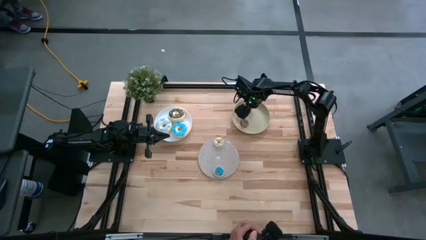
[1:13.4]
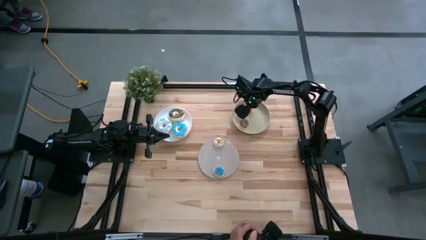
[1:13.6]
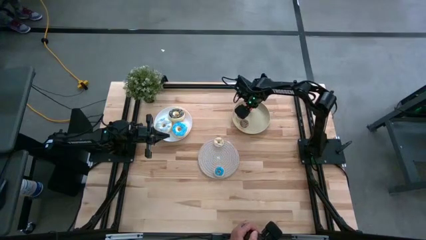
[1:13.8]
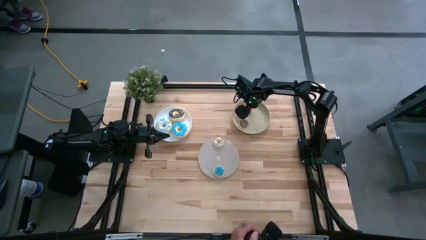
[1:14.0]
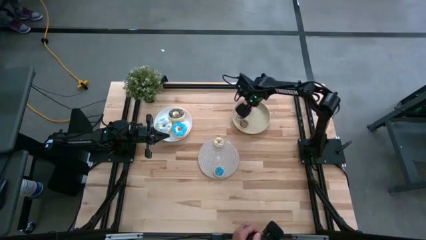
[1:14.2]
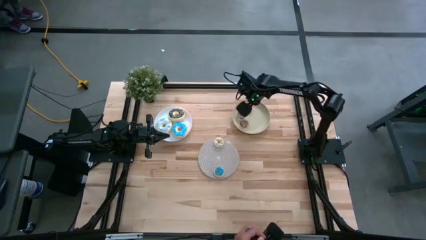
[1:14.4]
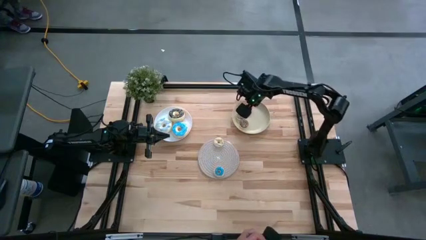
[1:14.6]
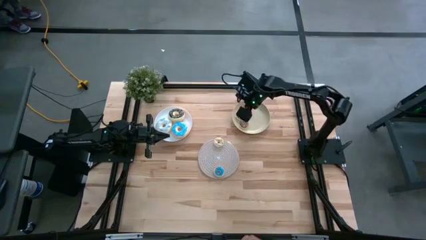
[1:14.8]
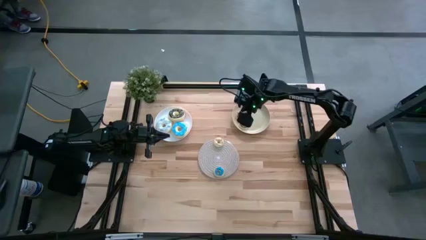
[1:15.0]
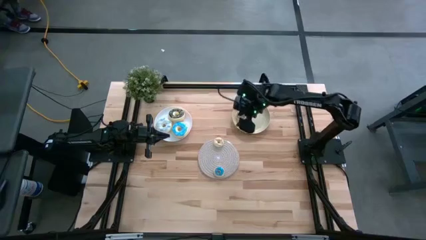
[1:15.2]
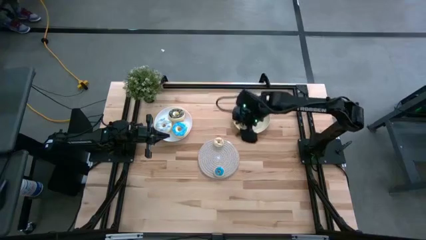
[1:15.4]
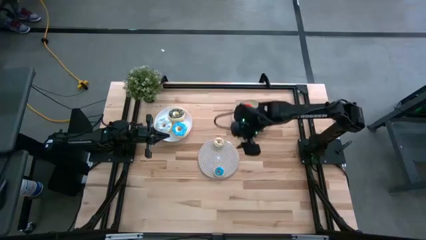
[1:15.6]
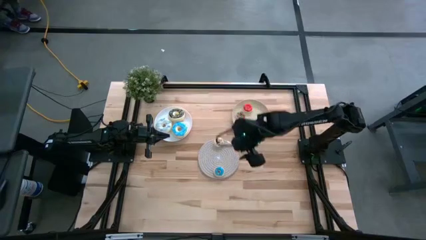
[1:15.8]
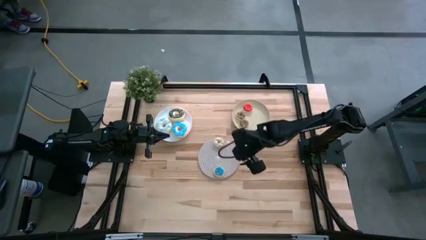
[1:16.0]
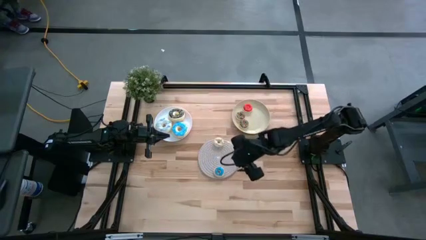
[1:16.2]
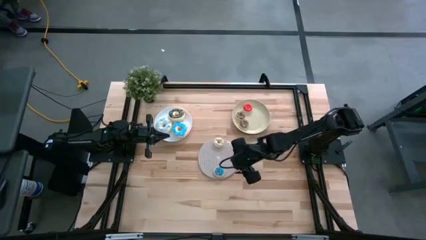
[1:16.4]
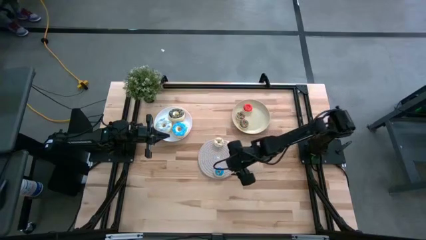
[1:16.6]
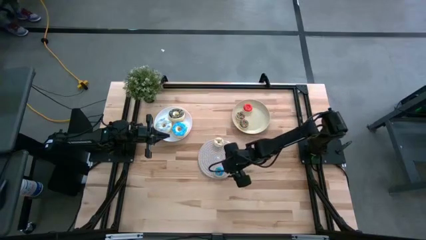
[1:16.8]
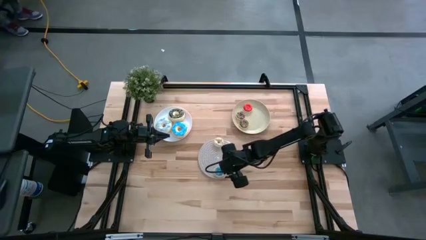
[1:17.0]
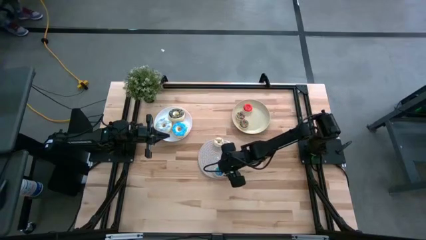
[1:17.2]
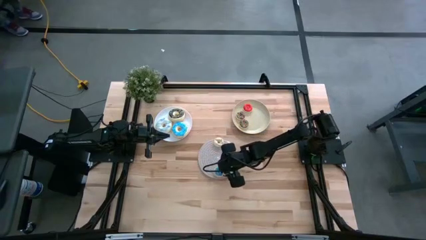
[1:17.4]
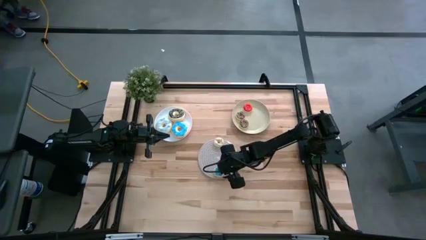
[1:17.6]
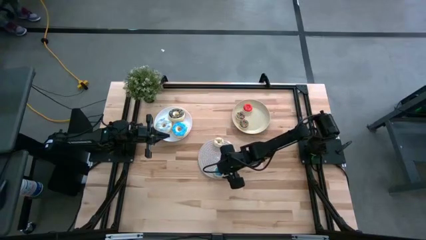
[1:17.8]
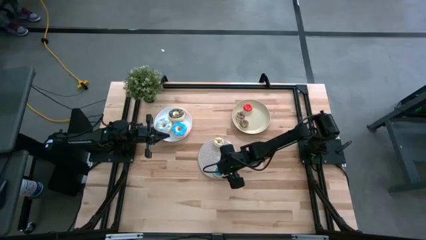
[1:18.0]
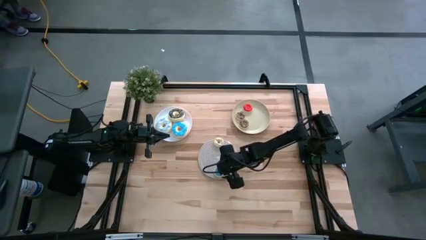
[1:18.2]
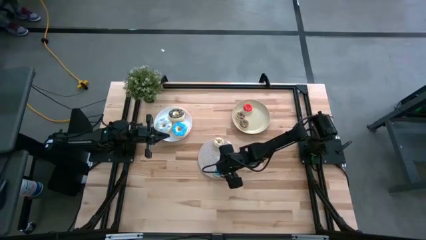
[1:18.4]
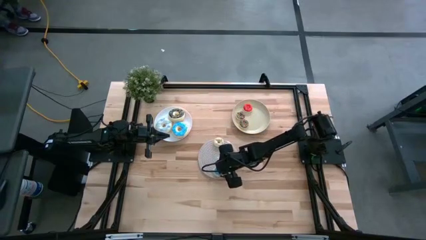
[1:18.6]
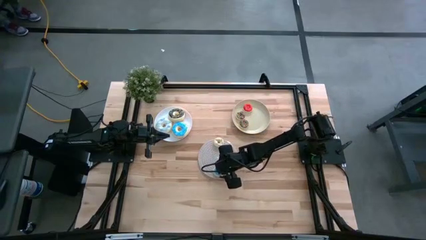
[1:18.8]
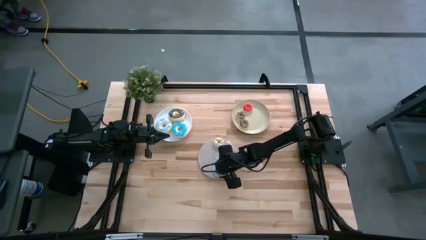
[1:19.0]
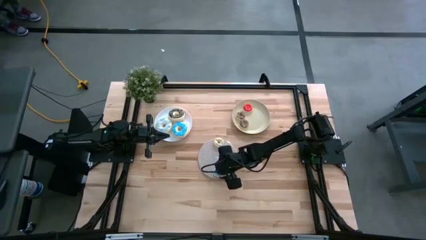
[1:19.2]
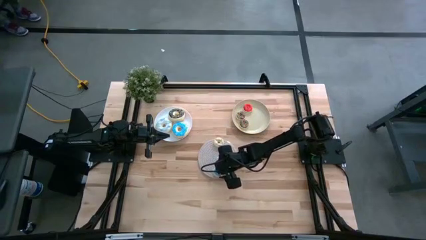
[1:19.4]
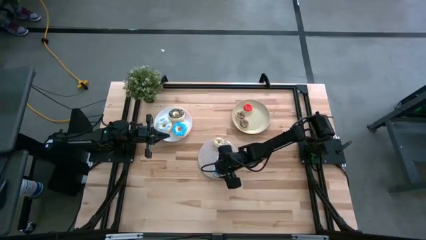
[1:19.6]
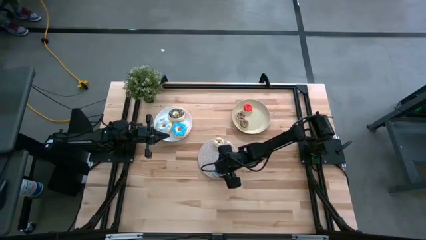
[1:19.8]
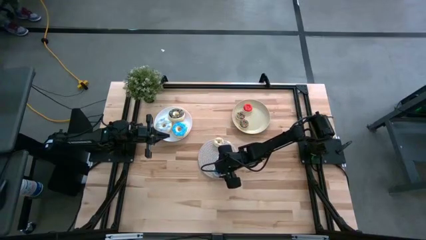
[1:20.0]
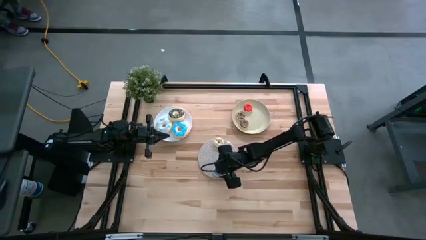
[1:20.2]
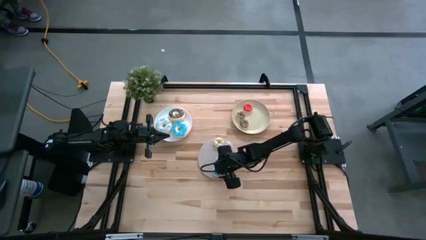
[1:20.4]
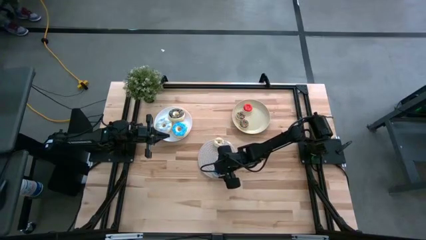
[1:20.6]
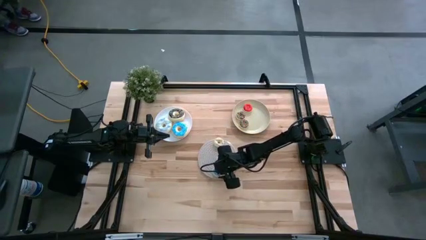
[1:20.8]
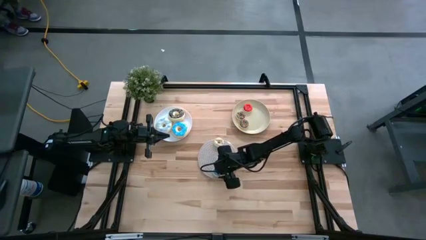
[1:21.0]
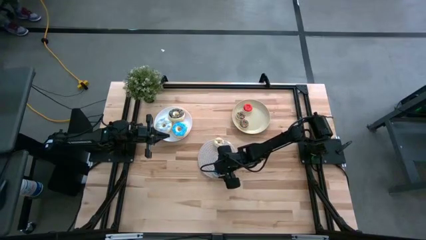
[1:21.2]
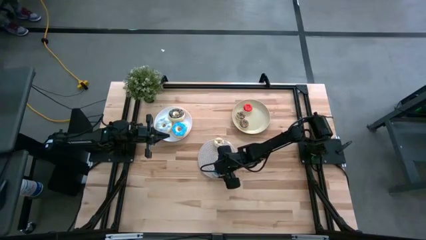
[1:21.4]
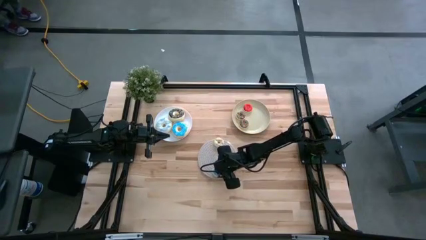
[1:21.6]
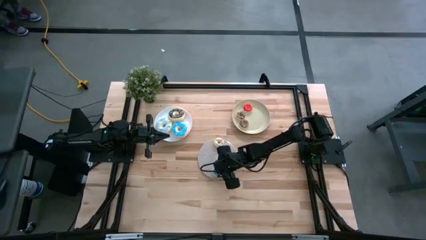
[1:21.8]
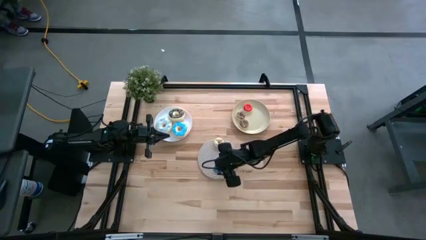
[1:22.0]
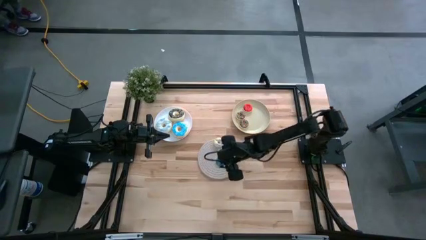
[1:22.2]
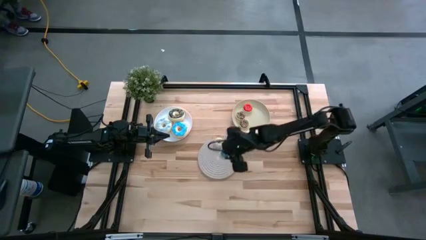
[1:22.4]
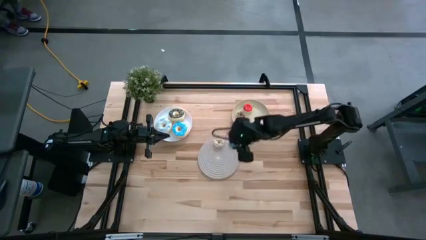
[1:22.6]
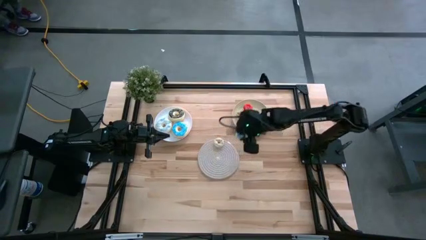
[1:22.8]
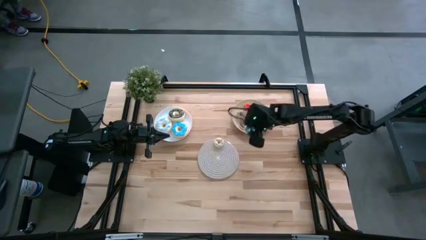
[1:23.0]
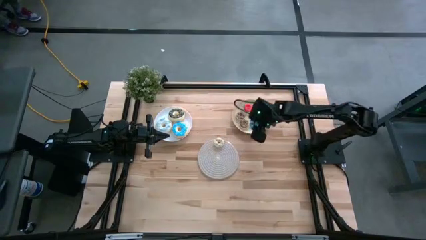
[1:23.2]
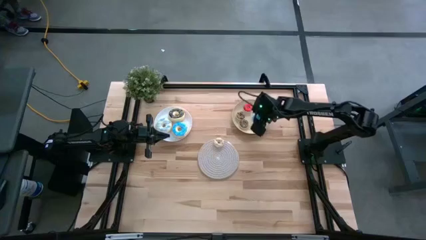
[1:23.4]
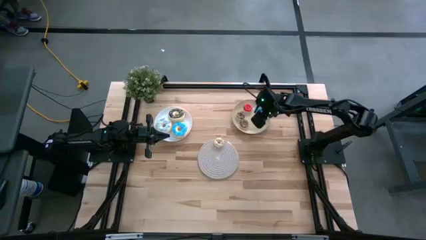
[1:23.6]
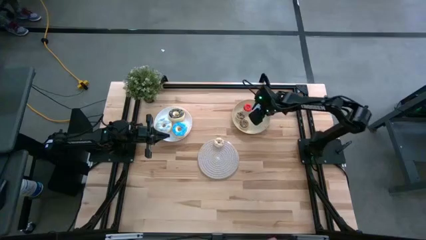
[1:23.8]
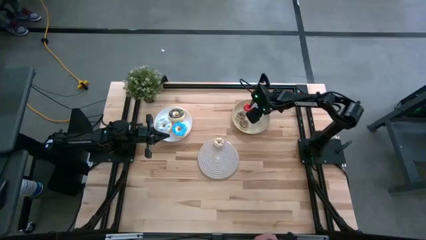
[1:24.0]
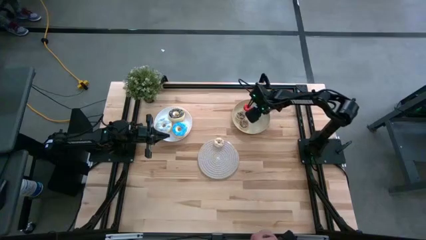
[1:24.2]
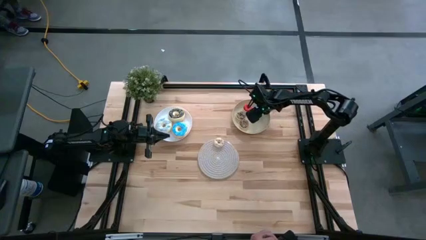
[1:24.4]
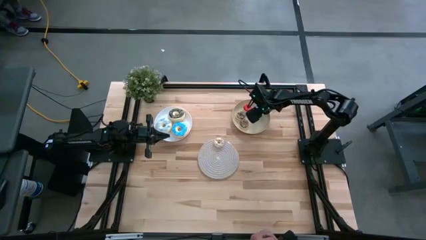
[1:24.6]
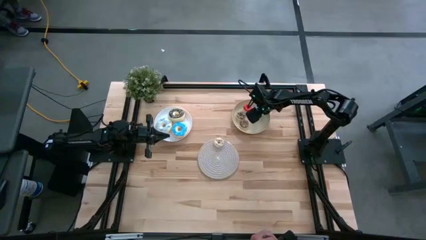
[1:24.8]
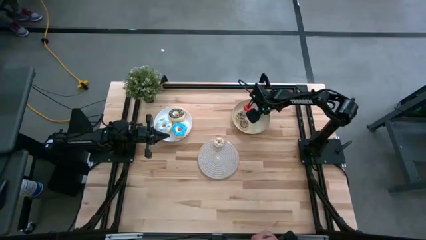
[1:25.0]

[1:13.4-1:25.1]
Task: Pick & Place donuts
Put the small light blue donut on the brown plate

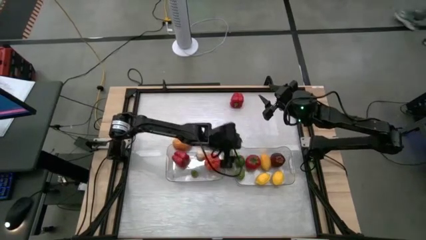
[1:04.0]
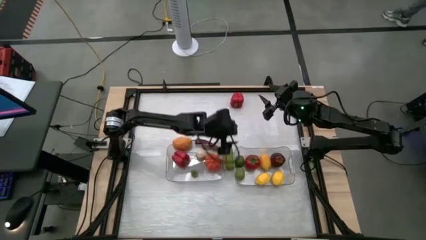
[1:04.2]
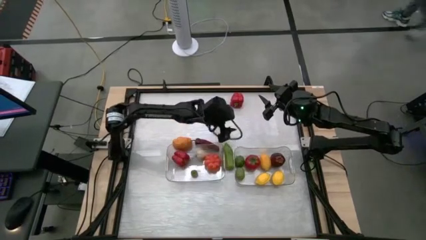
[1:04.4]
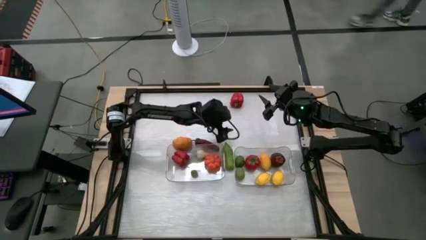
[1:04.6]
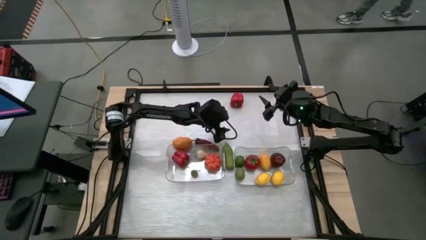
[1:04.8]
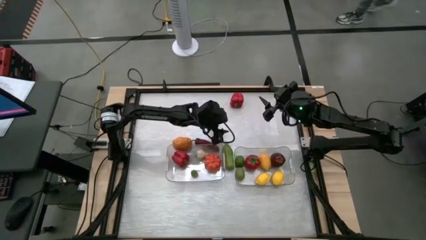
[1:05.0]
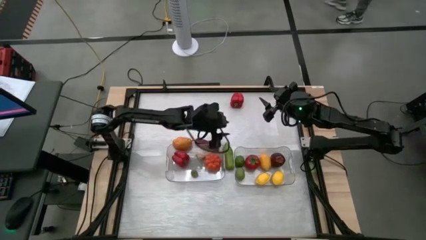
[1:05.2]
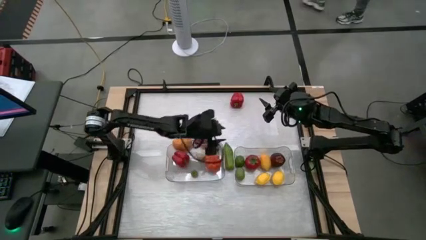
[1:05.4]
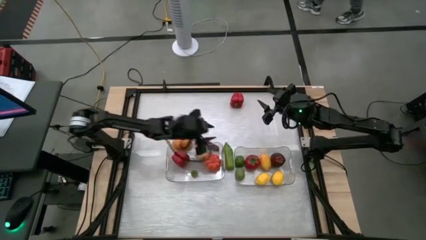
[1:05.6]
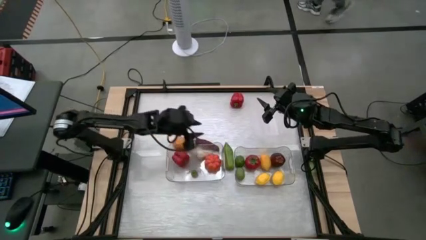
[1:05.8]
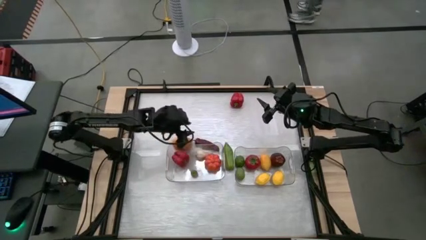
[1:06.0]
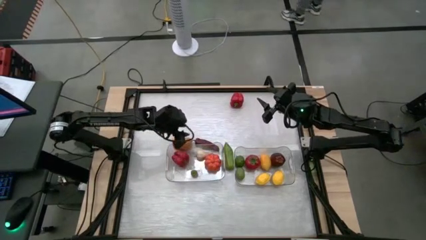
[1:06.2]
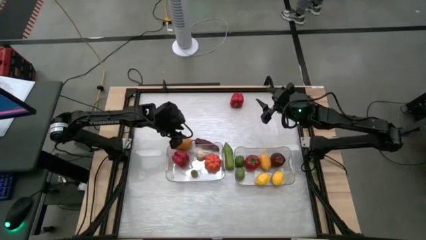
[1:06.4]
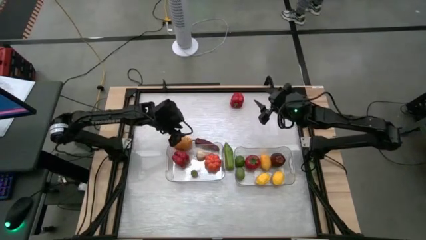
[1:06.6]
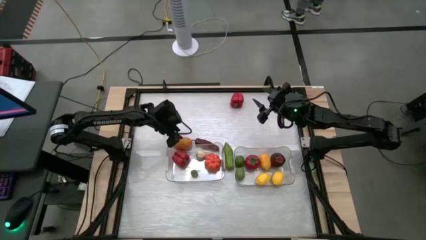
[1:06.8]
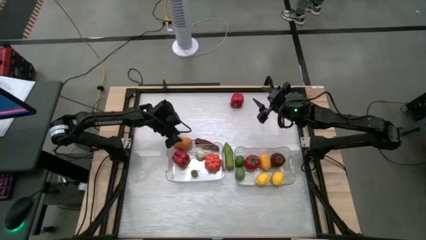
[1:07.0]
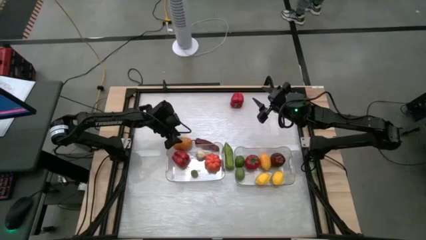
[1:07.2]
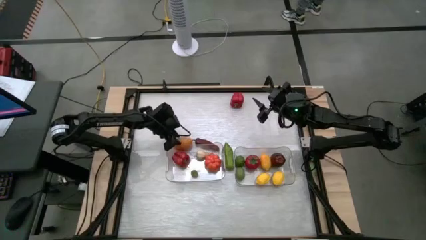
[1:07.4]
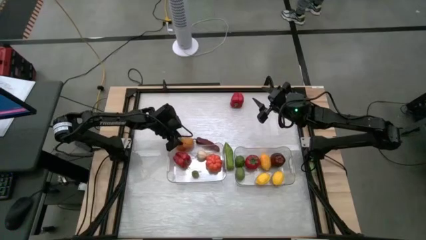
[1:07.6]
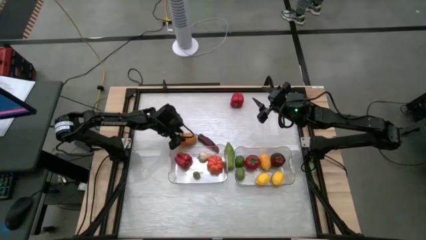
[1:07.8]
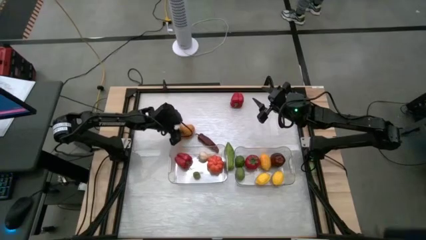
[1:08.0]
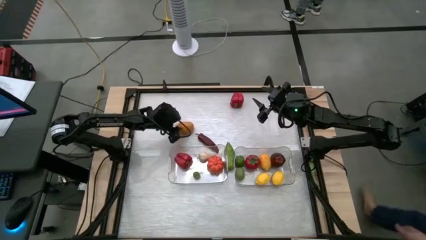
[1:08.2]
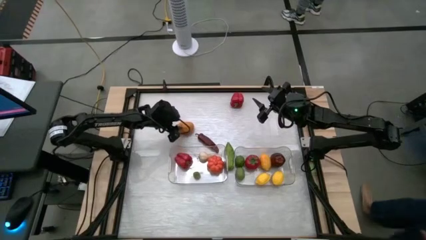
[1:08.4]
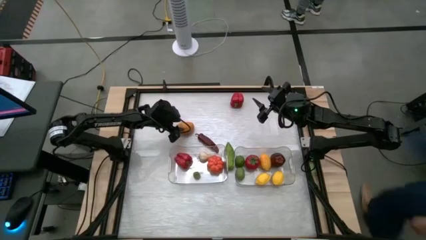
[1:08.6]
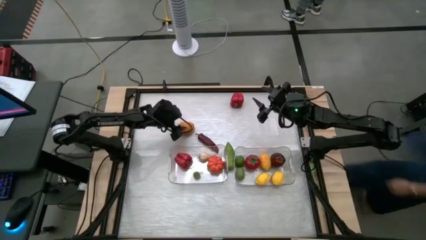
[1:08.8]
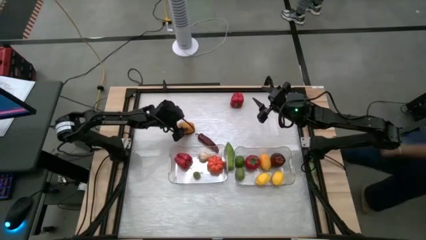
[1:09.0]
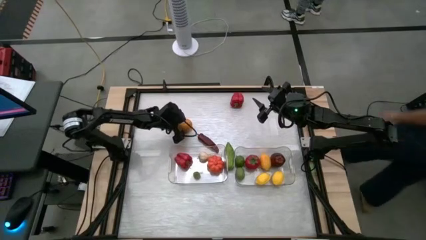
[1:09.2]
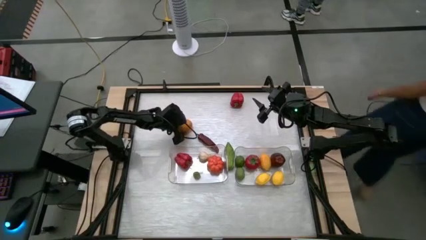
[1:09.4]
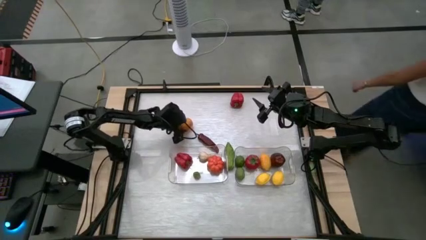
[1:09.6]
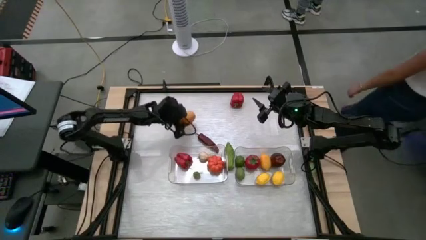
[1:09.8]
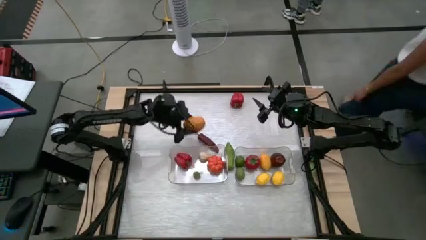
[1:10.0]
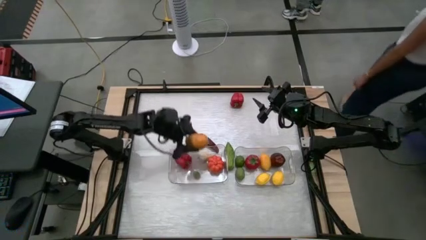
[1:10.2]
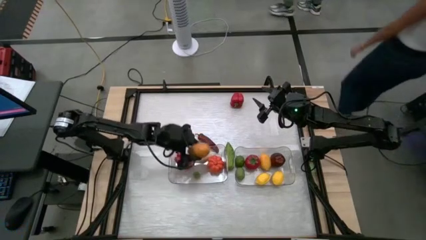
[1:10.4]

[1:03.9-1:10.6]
Task: Sort produce into baskets
Put the potato into the left transparent bin
